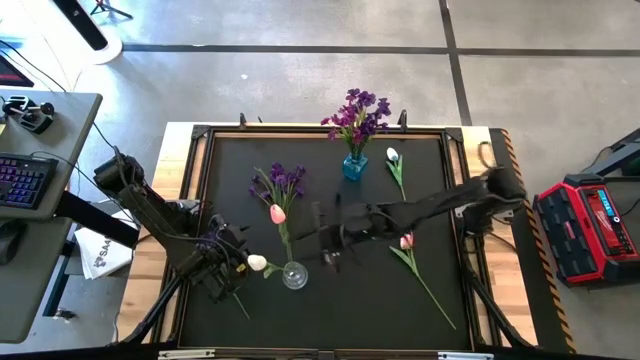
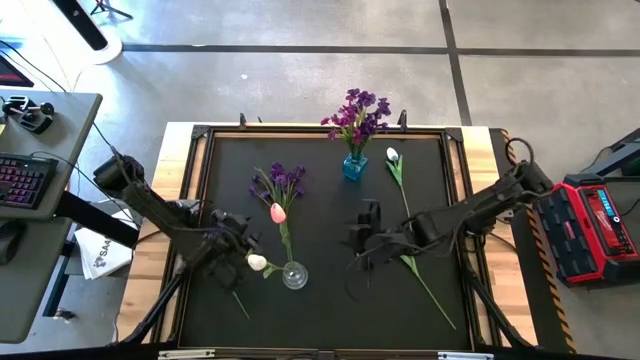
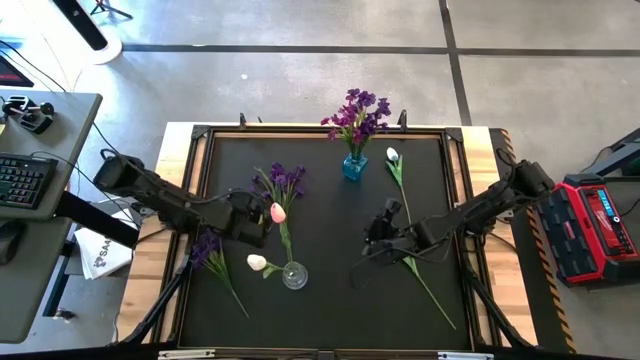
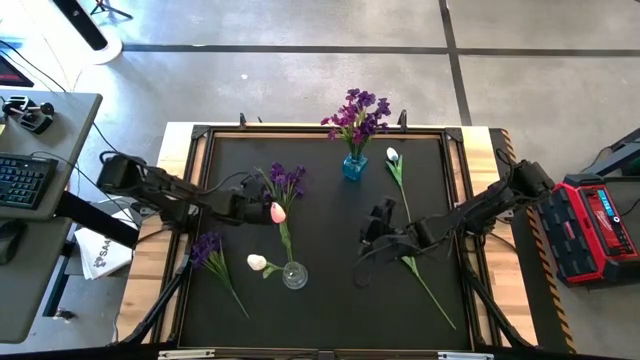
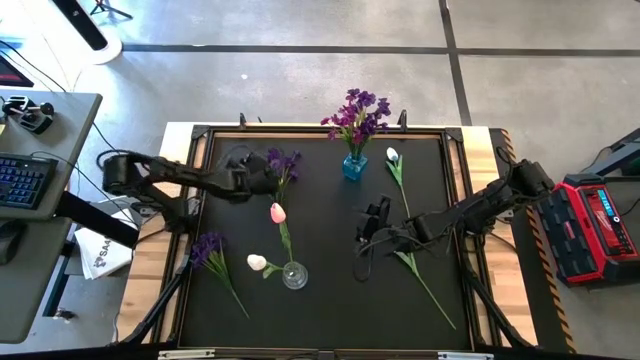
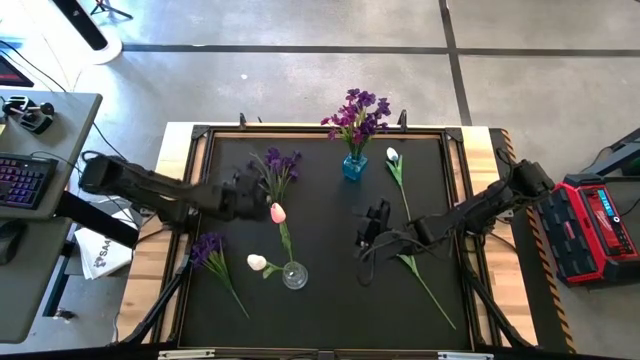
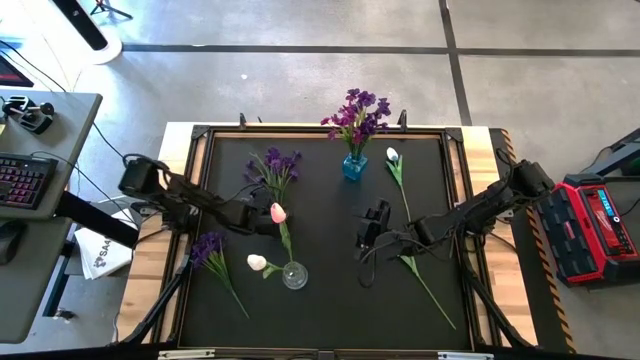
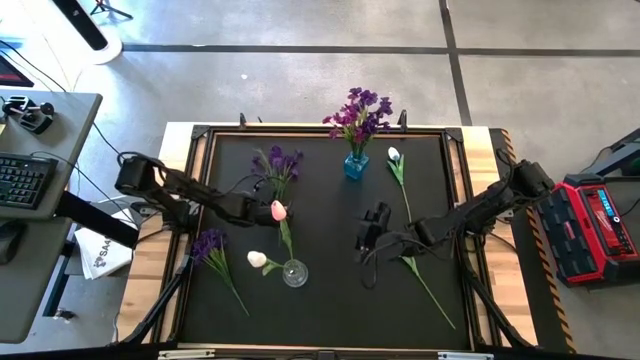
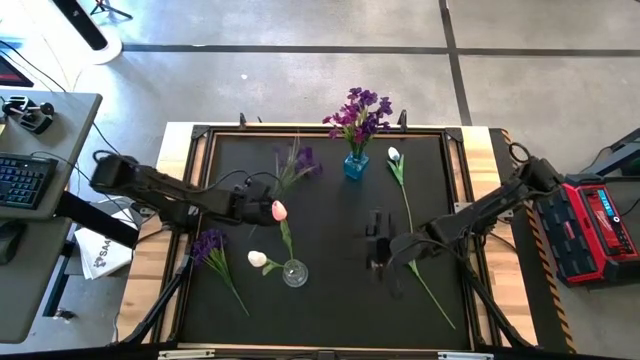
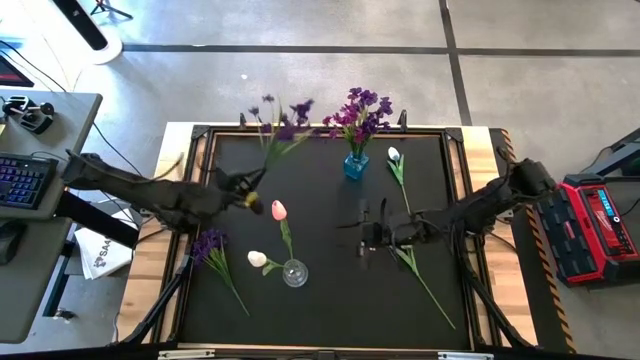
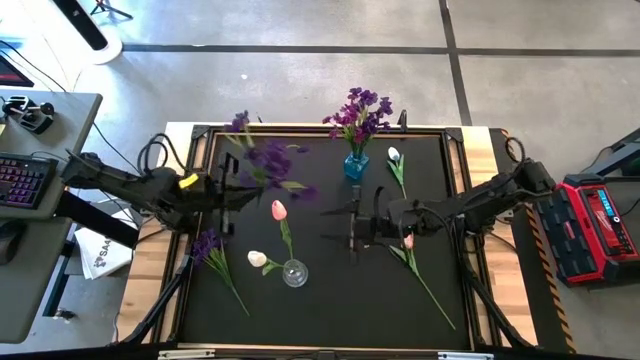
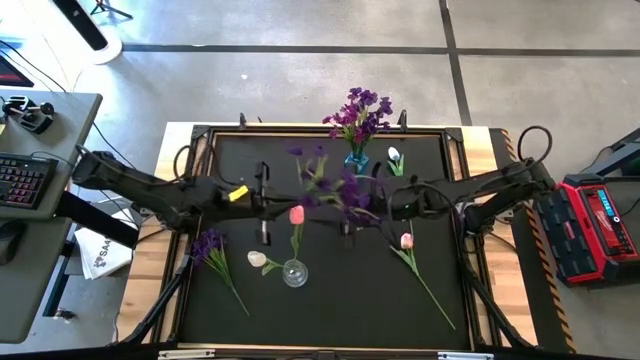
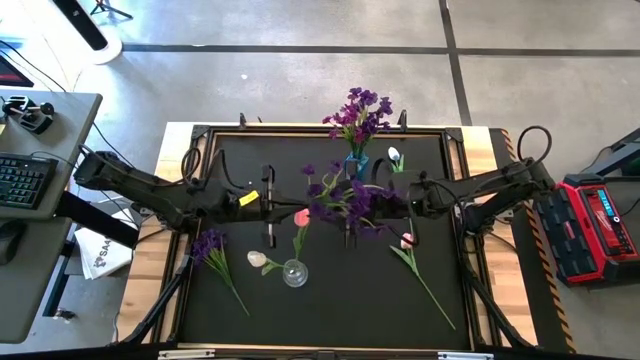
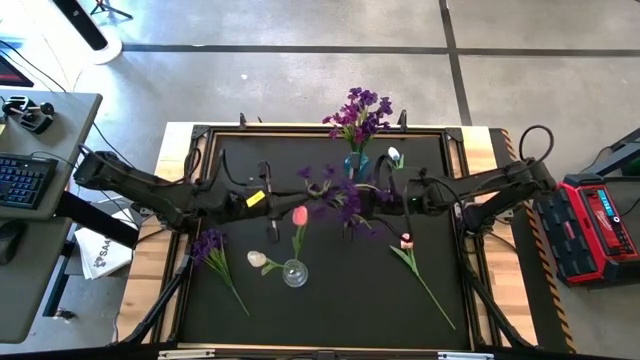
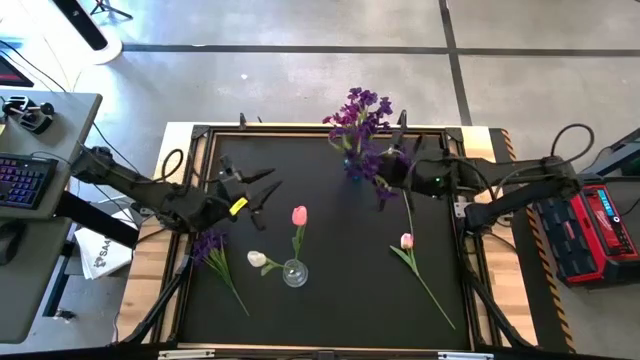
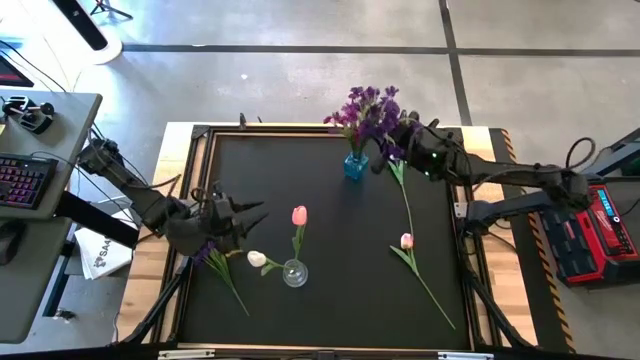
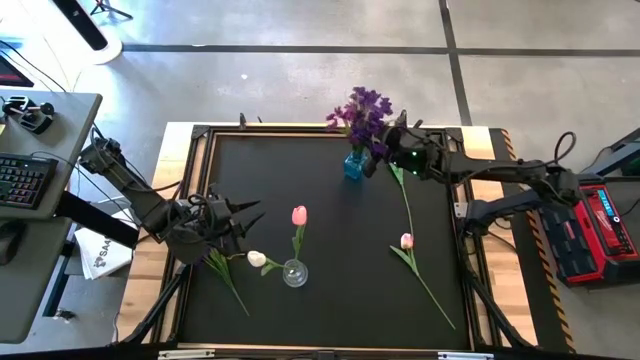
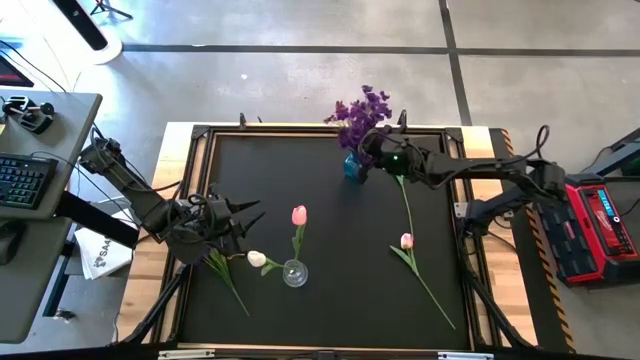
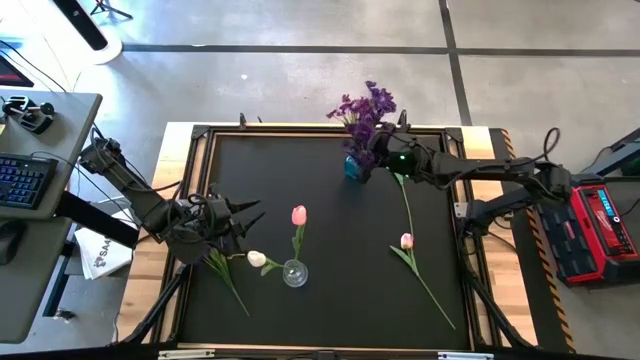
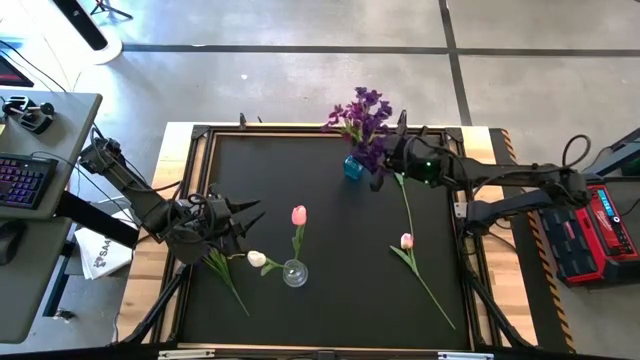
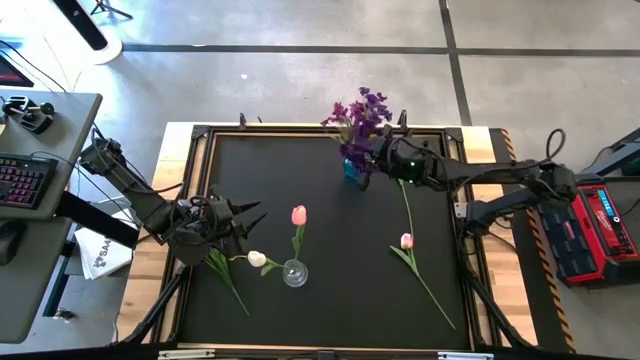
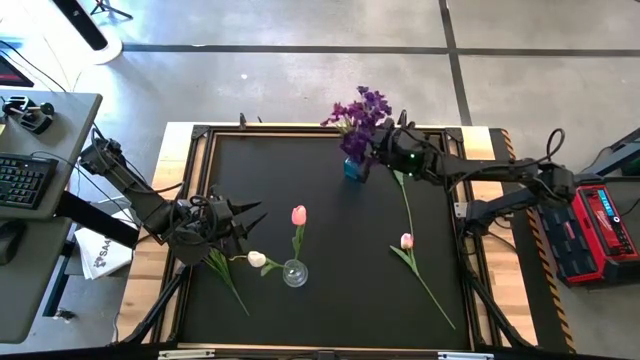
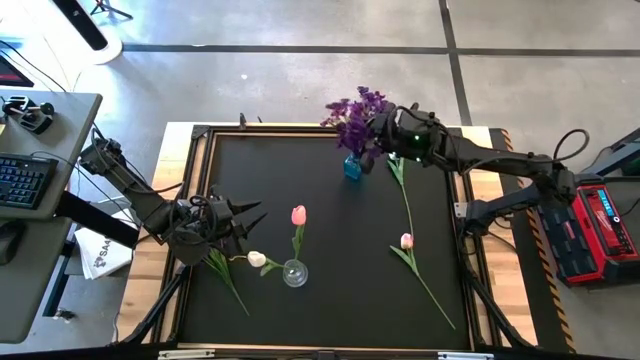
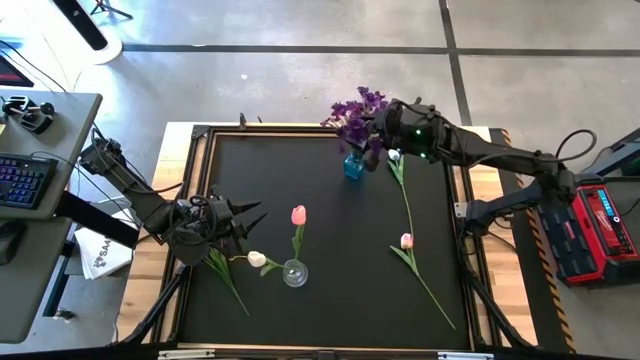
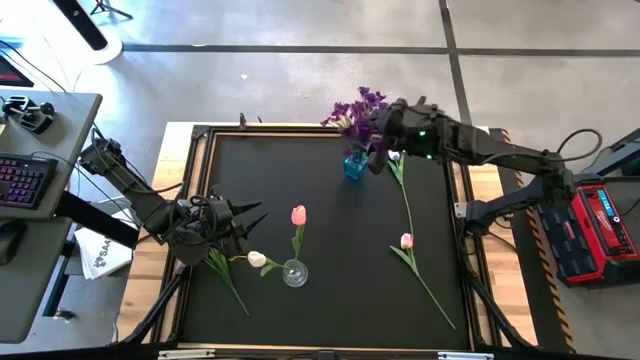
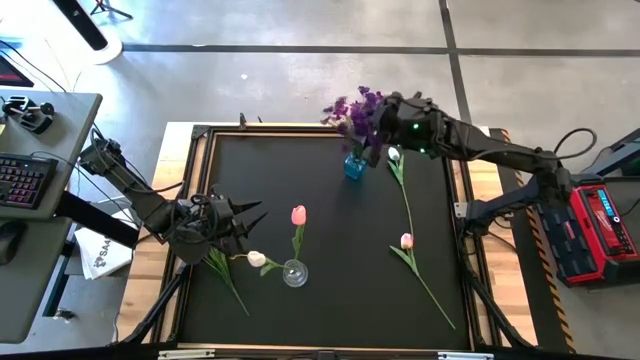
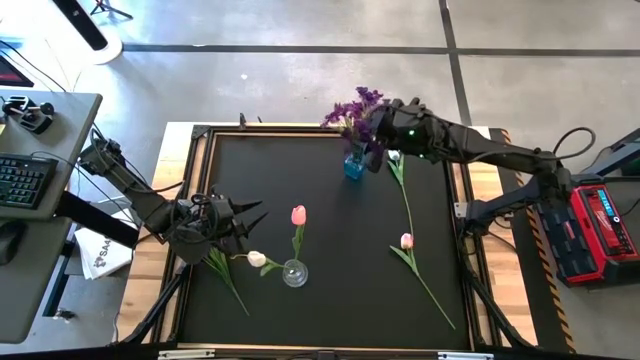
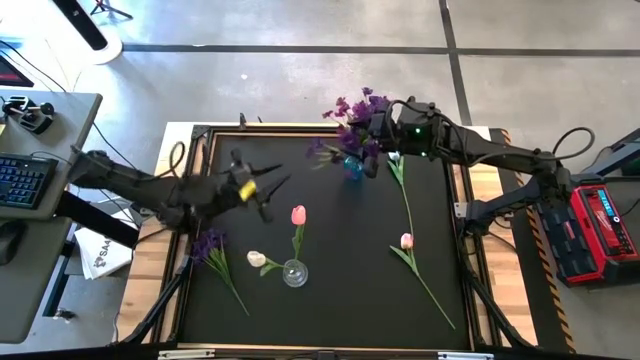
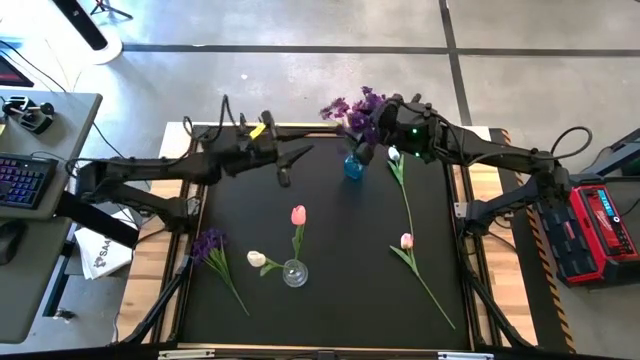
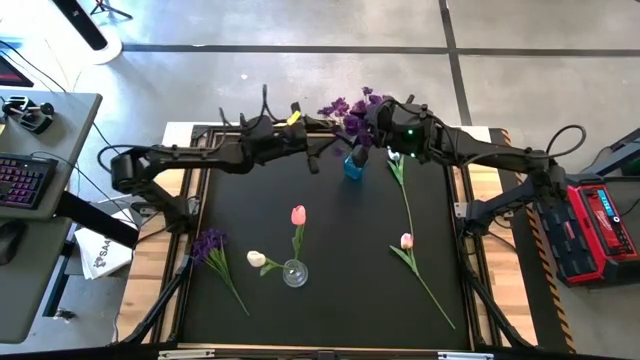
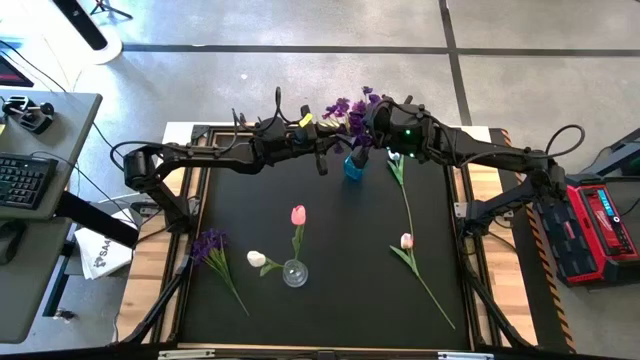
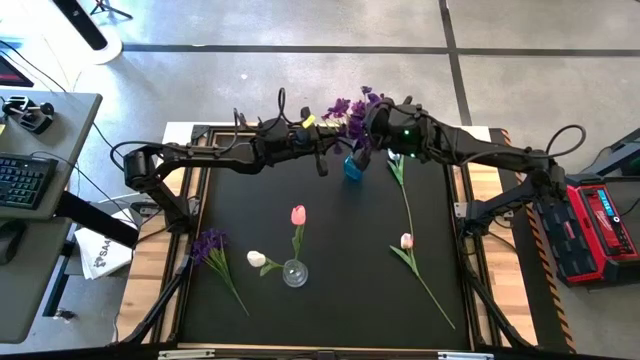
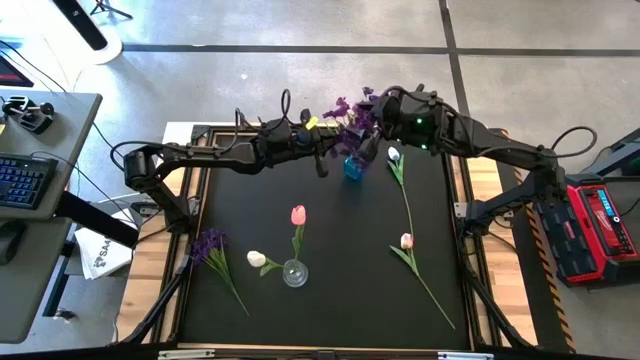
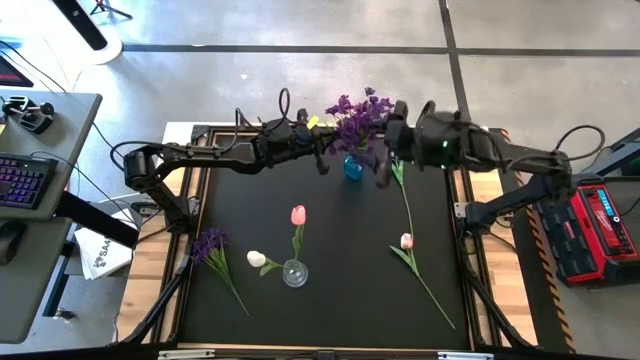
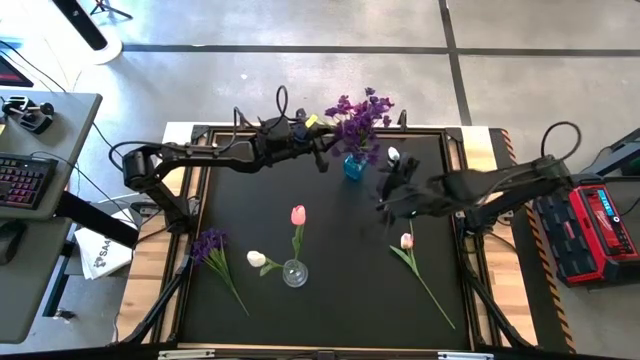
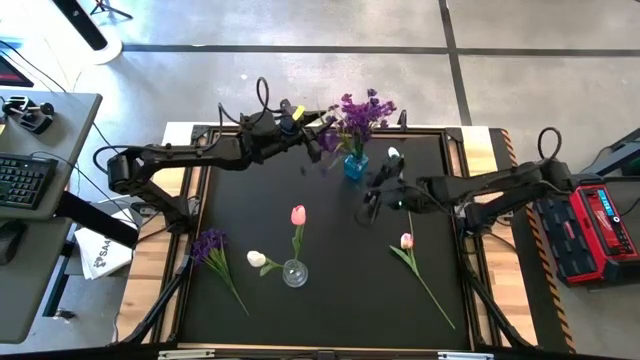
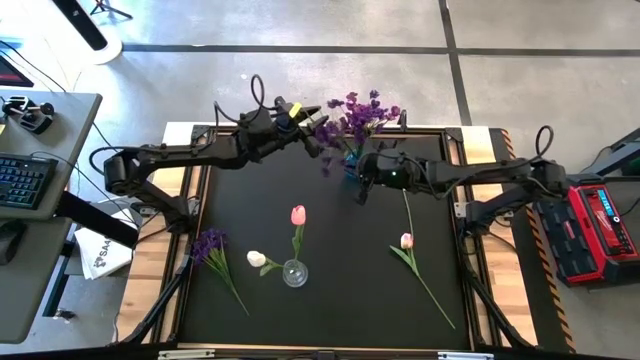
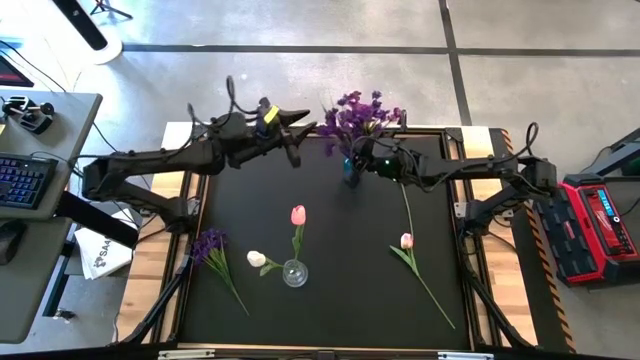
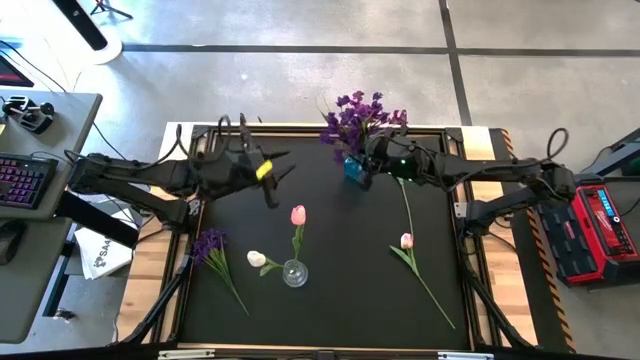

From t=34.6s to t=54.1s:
Task: Sort flowers into vase by color
Put the top dark violet flower into the blue vase

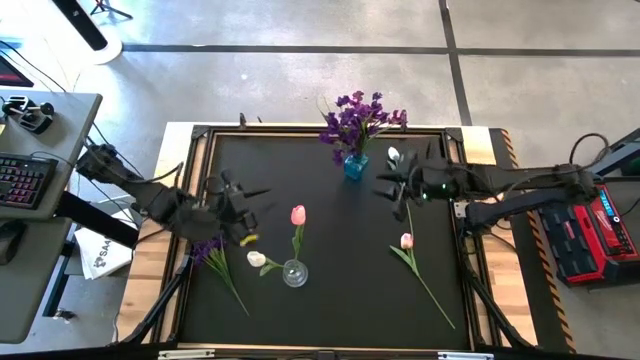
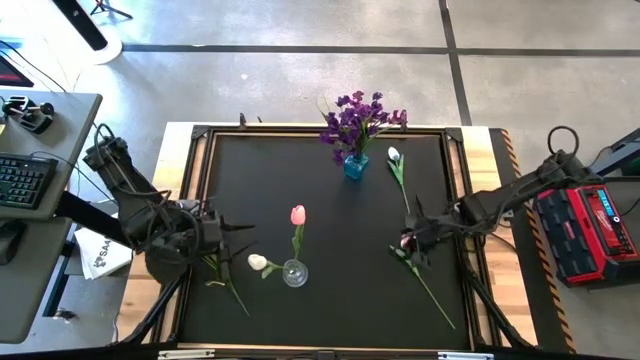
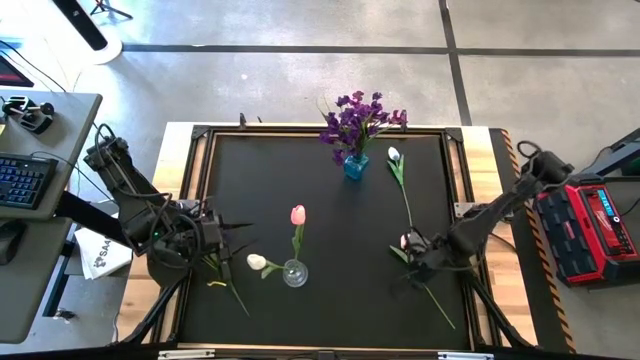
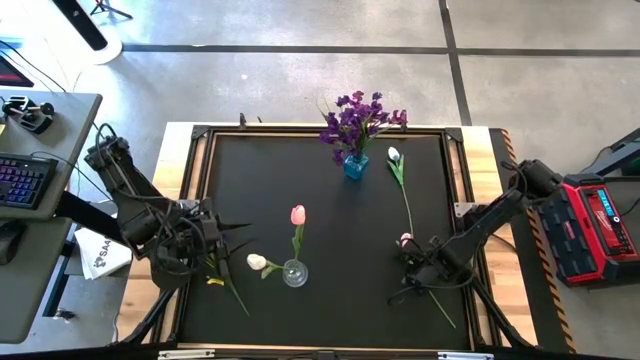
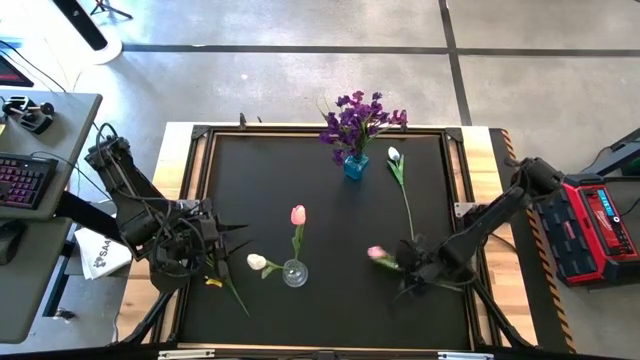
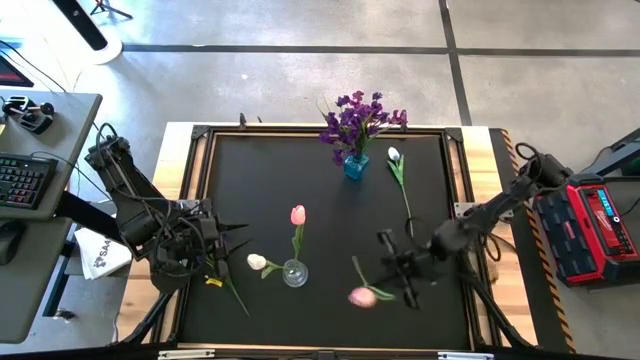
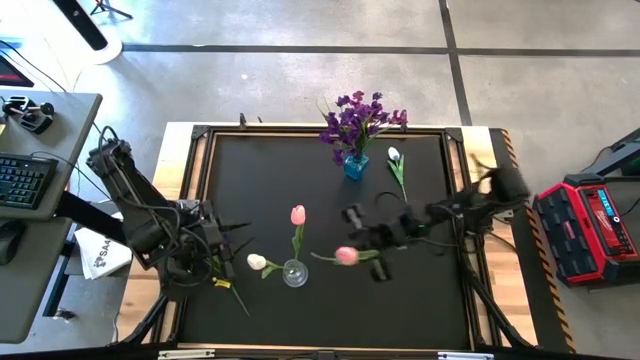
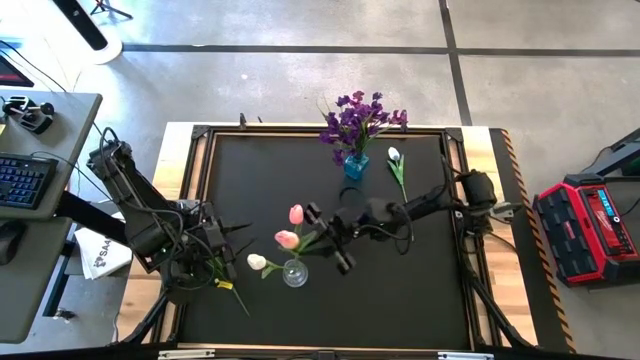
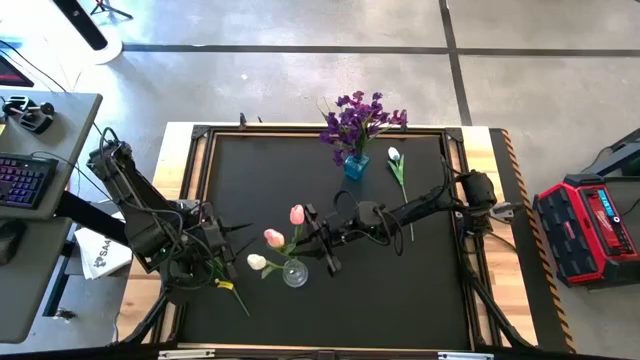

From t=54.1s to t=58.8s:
Put the pink flower into the transparent vase
